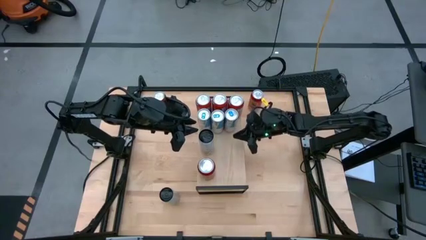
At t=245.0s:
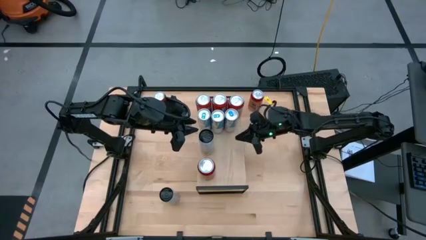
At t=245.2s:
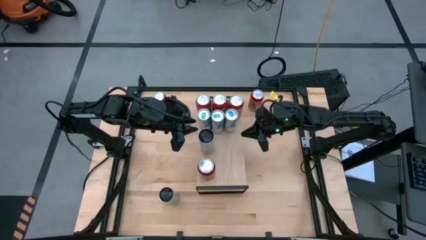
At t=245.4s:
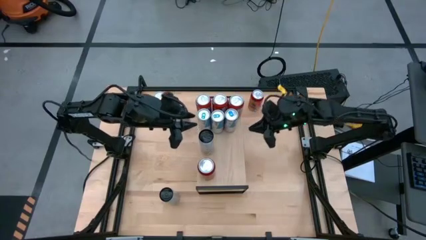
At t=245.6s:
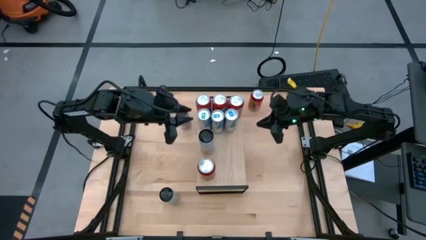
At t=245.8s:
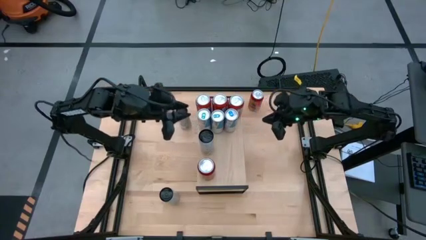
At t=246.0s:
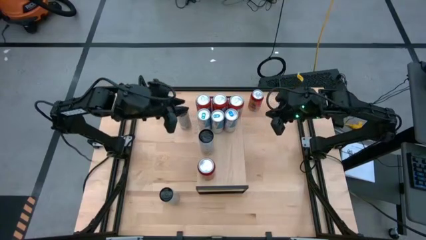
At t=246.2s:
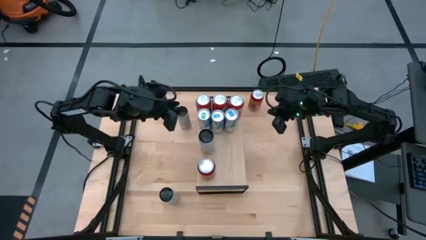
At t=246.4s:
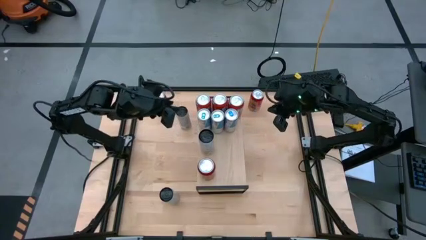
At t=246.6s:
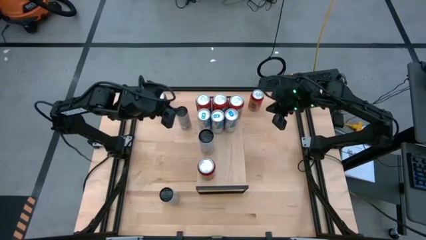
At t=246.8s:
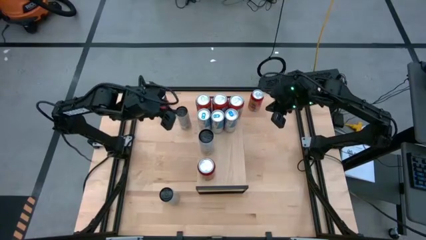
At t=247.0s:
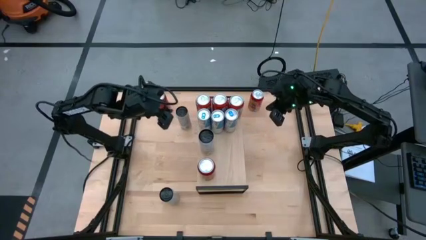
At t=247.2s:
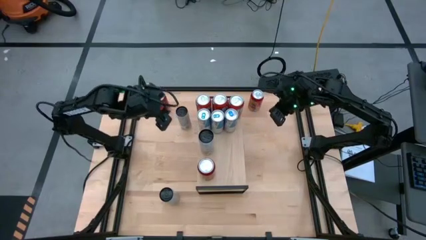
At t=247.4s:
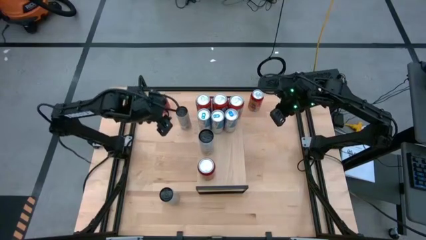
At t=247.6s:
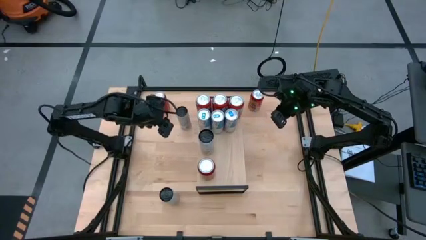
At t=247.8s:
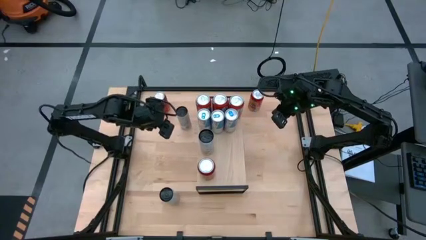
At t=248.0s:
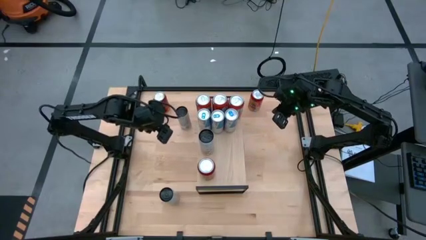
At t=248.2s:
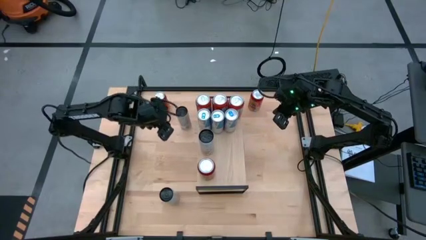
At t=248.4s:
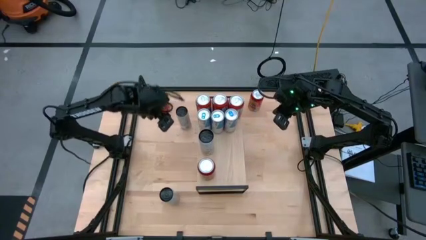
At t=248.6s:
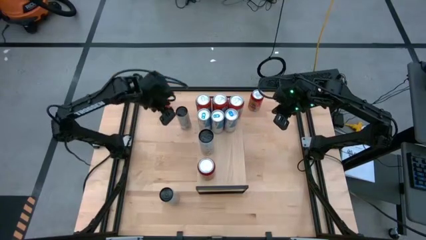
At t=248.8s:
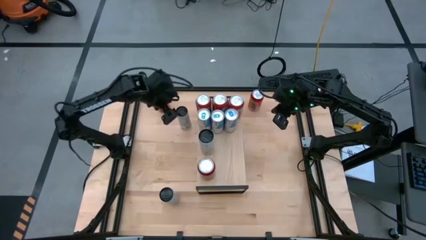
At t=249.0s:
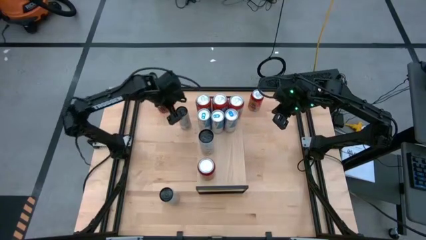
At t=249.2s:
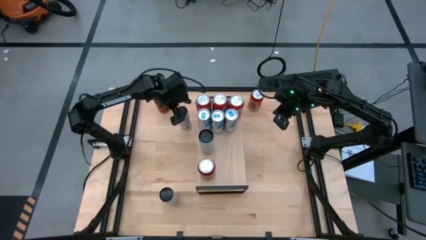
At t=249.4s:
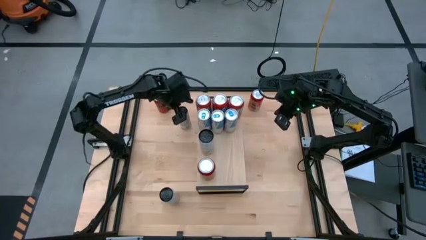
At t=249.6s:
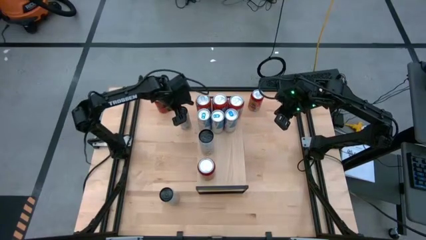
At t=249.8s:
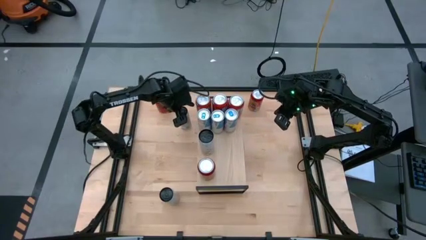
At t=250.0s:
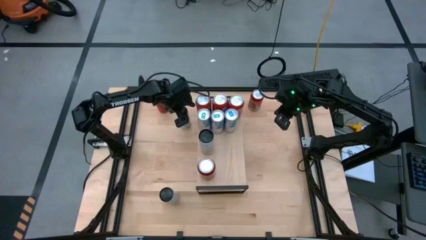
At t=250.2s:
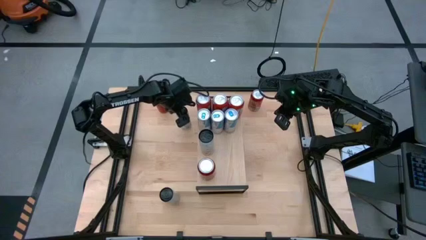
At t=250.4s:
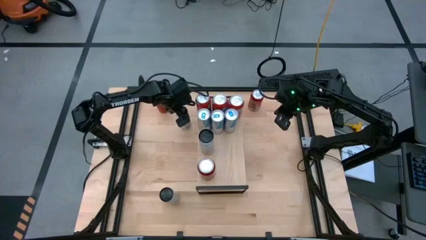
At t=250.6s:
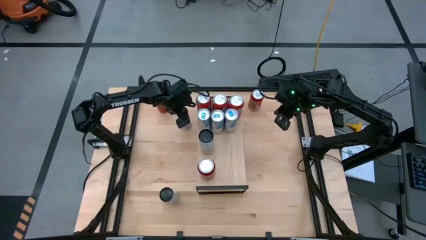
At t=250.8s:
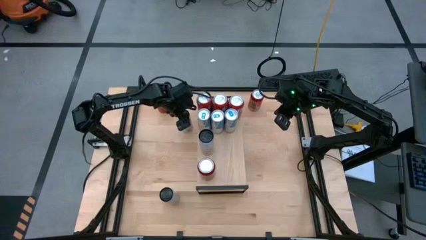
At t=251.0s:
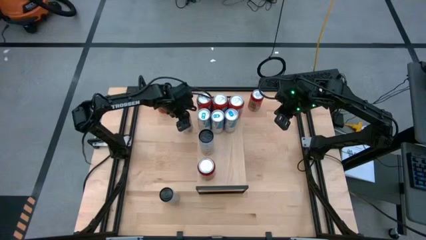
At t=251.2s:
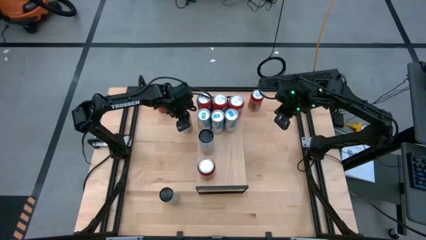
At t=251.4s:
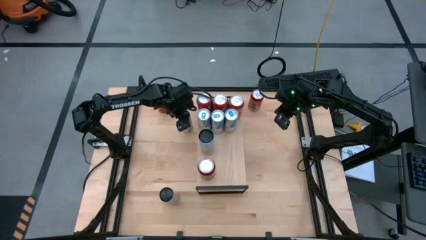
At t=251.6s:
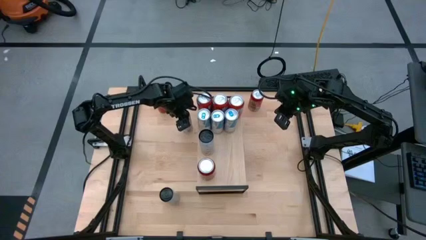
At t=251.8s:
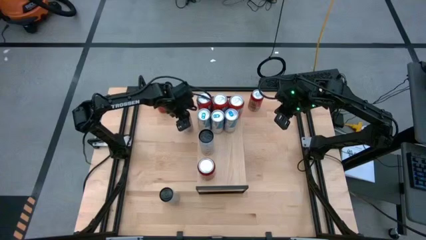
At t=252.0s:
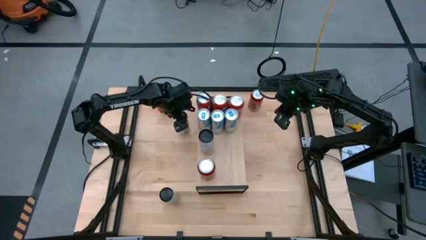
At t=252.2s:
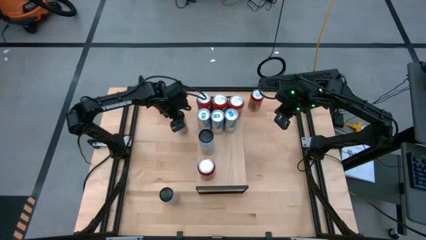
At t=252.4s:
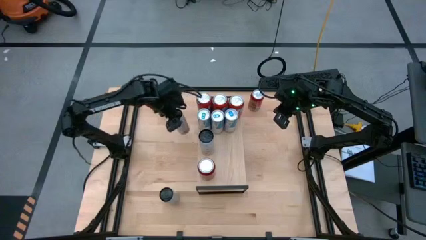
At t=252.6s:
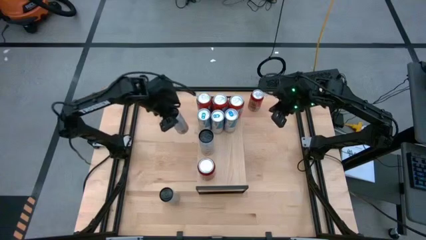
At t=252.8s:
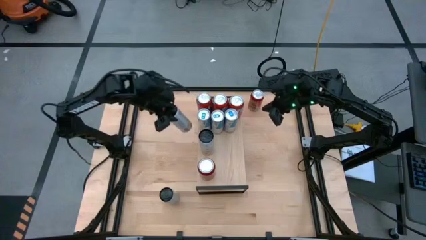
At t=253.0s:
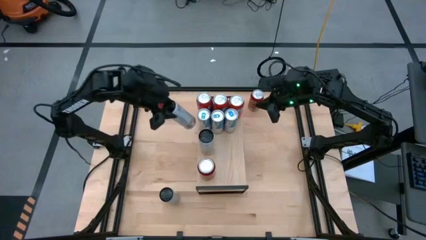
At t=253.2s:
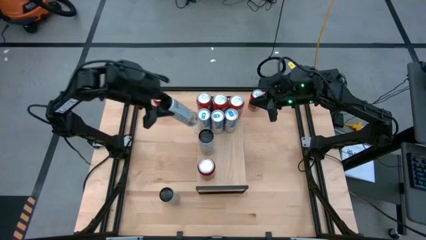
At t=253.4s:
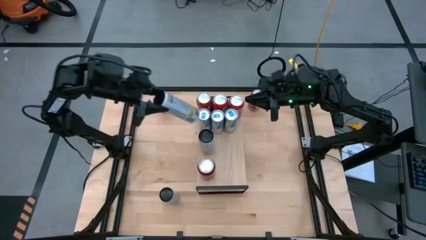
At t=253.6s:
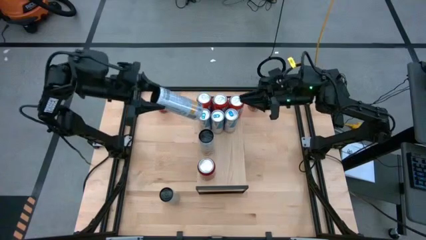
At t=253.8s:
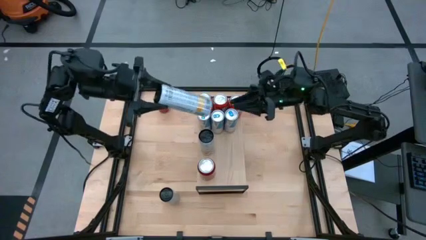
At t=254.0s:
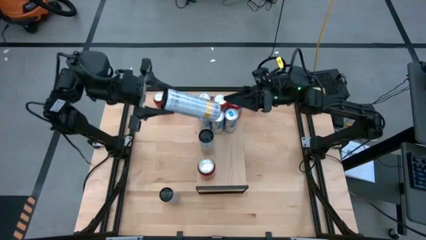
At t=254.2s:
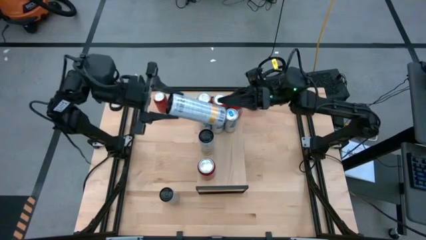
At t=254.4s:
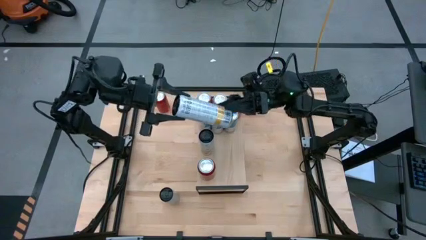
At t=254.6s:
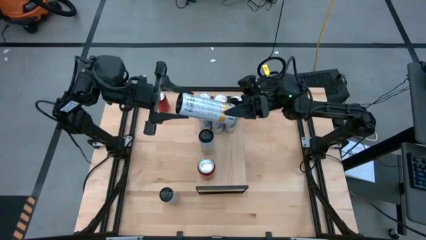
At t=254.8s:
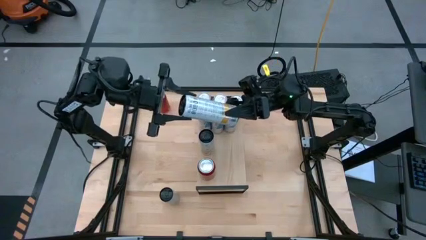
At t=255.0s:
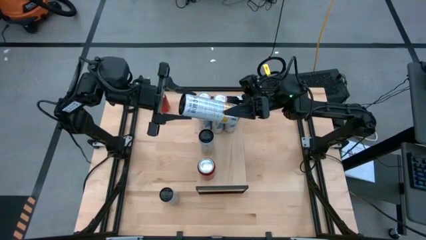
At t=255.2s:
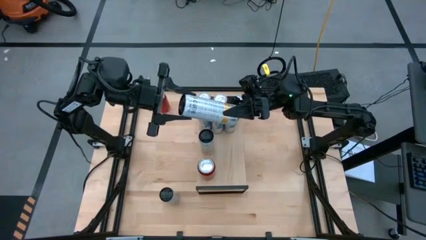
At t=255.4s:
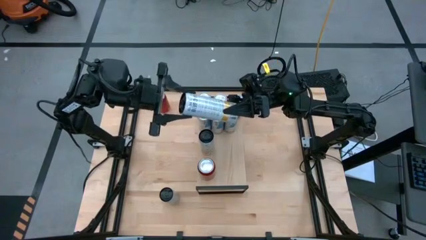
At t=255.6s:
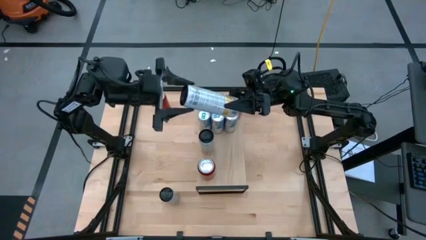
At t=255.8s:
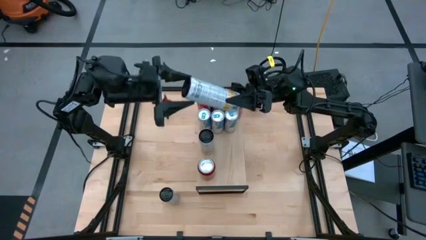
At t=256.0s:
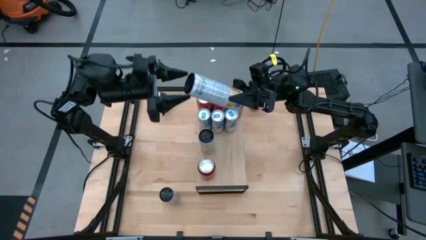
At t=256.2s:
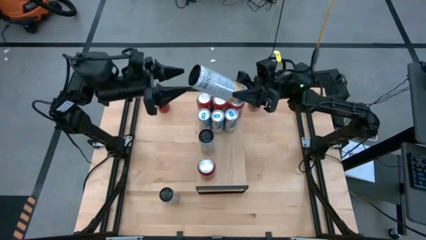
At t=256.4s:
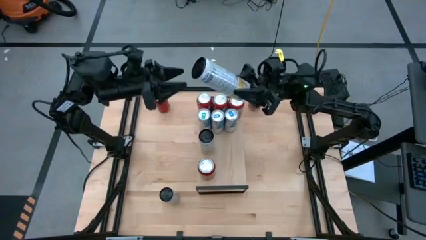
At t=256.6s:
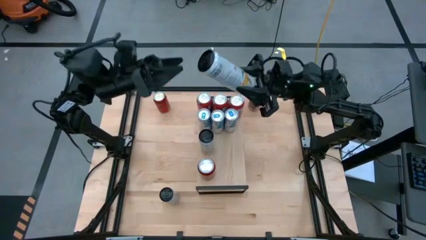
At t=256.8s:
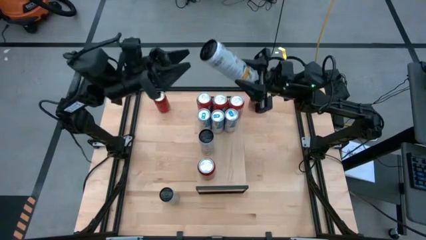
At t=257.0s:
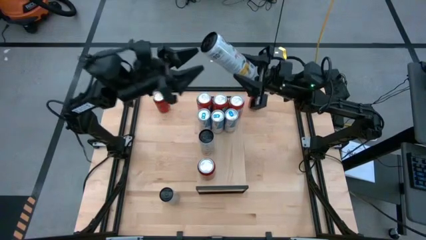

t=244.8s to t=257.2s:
Task: Place canned beverage on shelf
Put the top white and yellow soda can on the shelf aligned with the other white and yellow soda can
